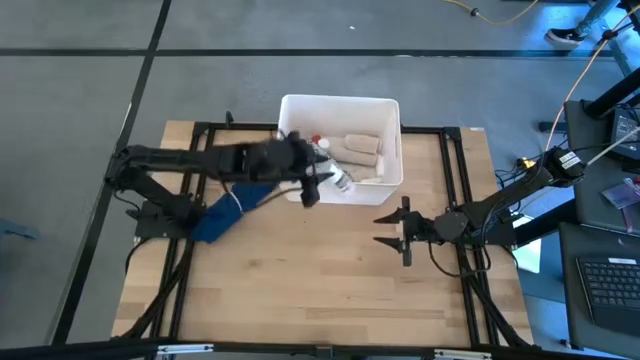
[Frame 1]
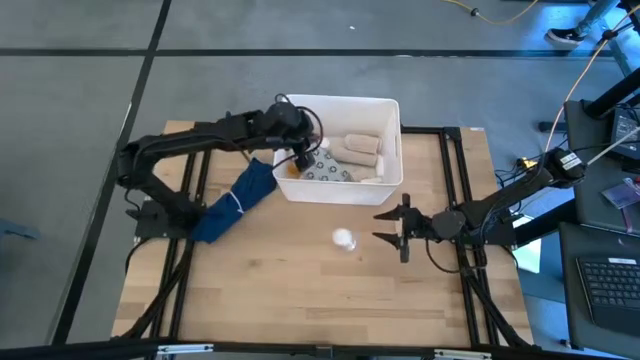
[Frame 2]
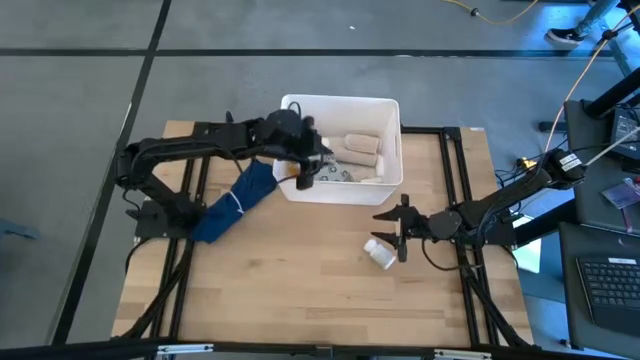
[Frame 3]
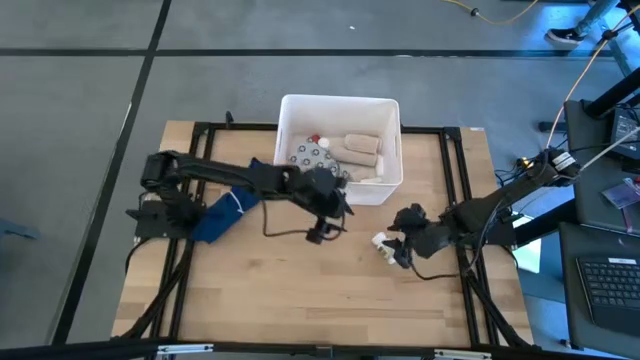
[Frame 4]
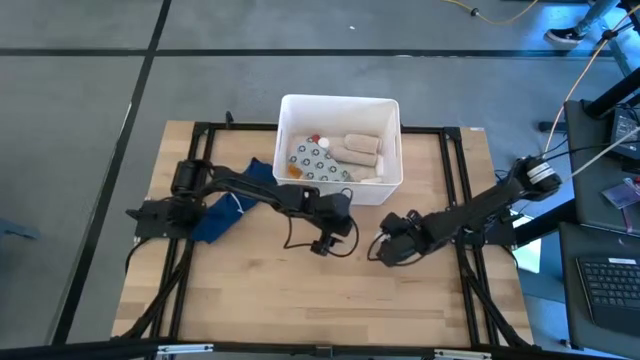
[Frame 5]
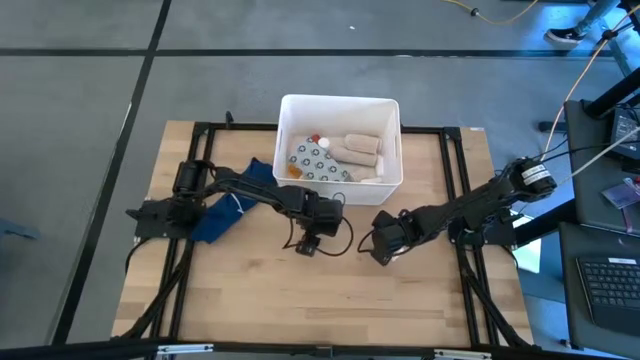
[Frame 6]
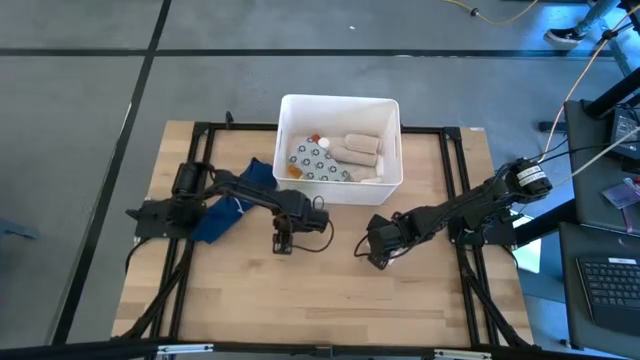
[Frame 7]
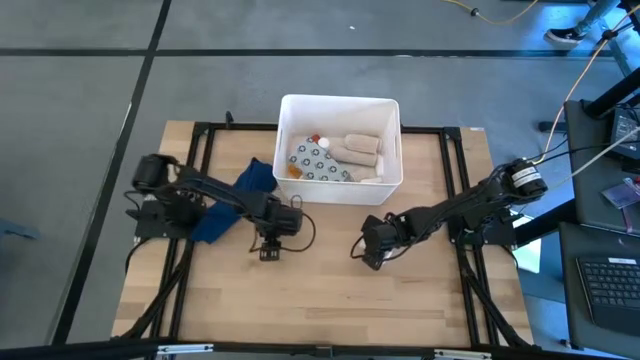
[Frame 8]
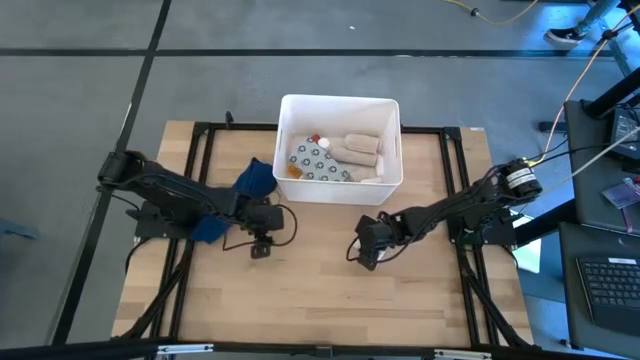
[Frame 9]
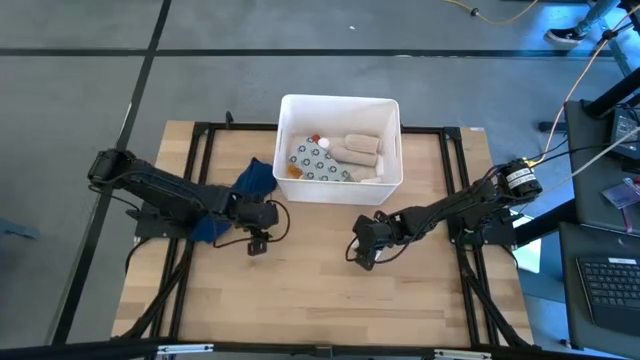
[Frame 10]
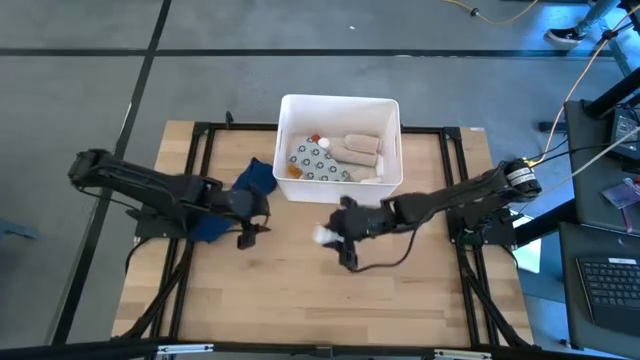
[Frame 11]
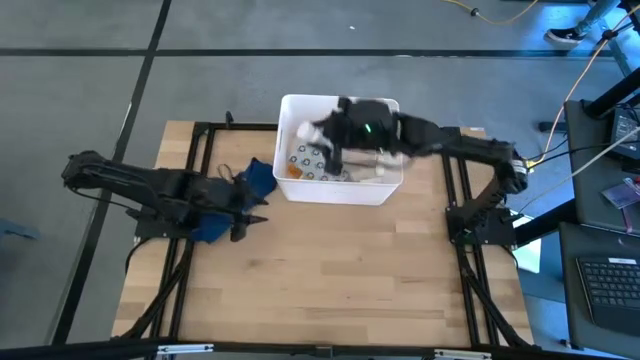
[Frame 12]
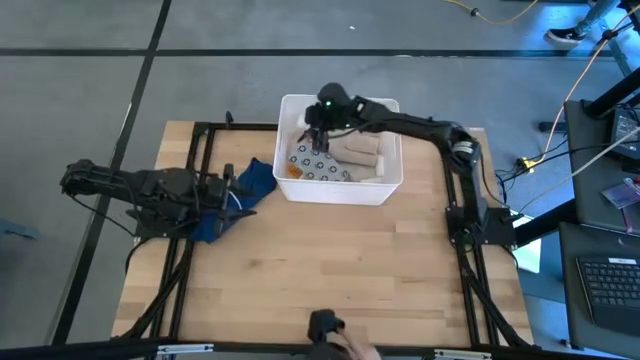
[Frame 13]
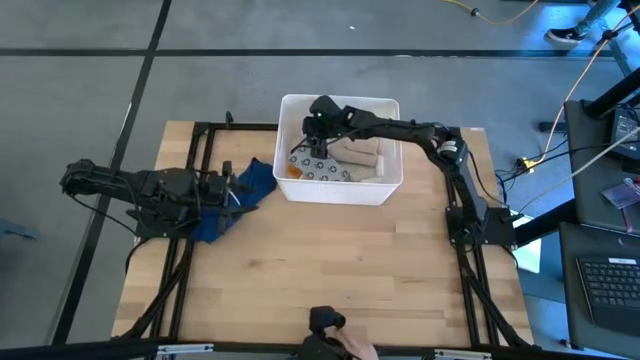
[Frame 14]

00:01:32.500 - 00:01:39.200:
Task: Pick & place medical supplies in basket/bin
Put the white and green pill bottle into the white bin

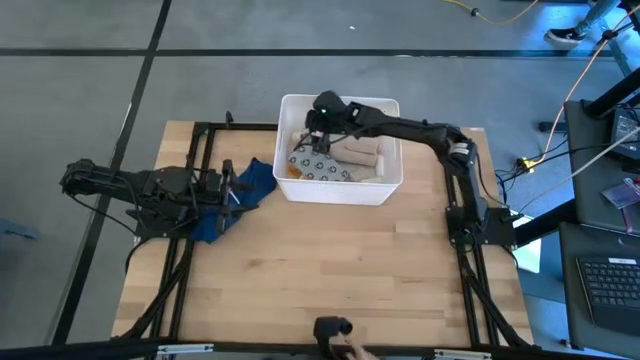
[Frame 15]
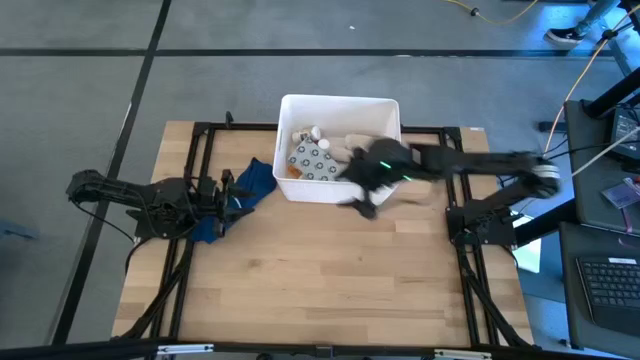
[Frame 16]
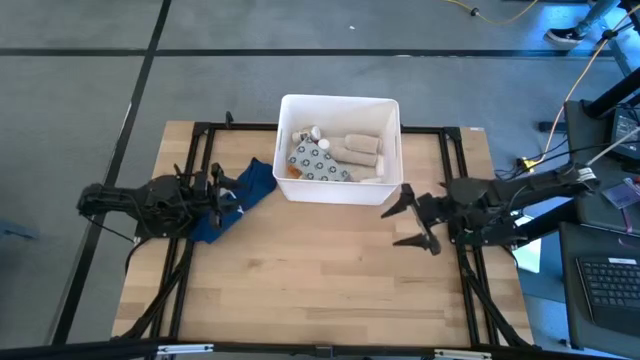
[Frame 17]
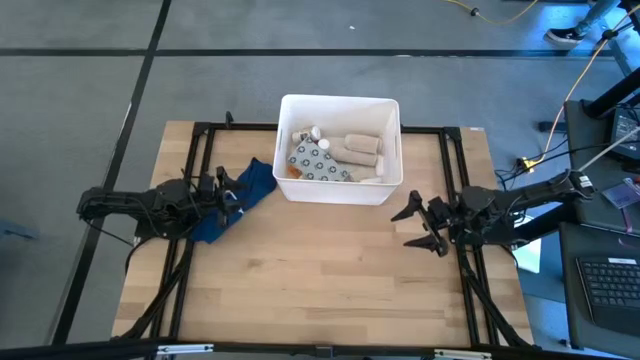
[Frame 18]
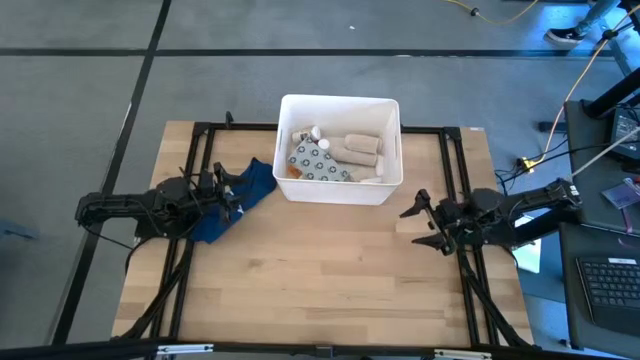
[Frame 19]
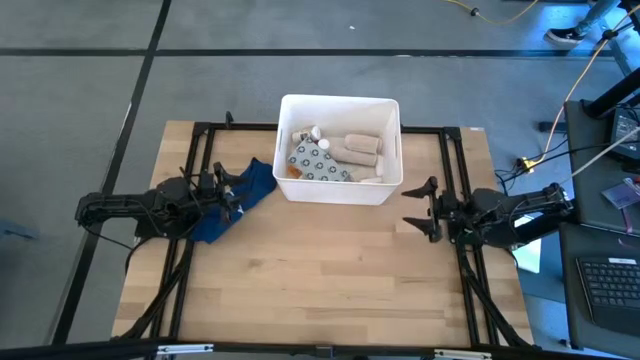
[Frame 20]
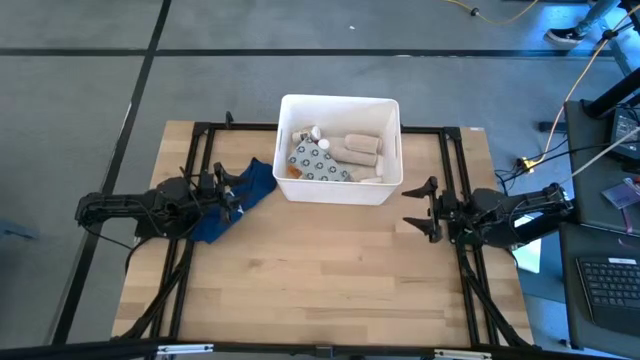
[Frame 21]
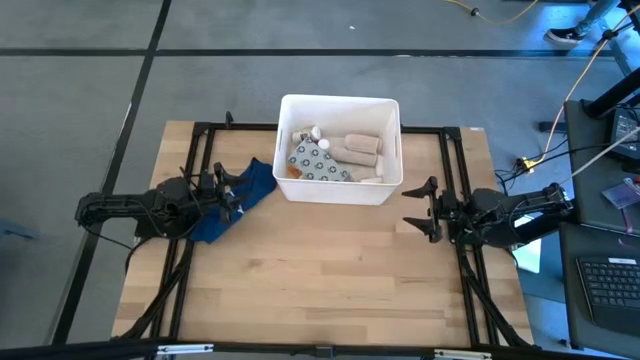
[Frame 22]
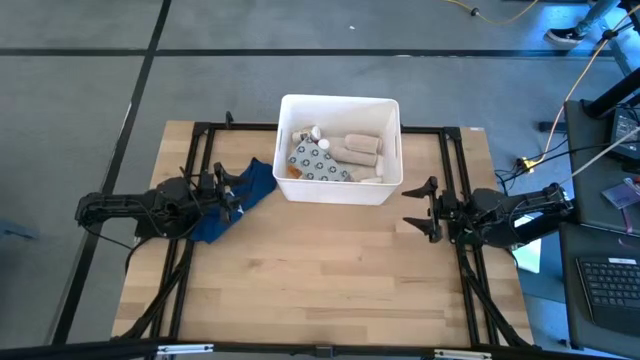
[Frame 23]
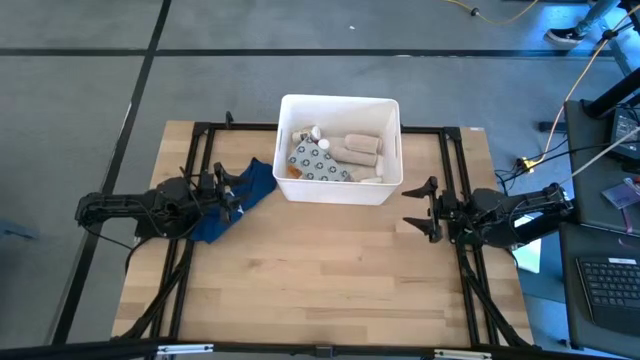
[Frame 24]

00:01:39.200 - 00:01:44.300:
Return to Home Position

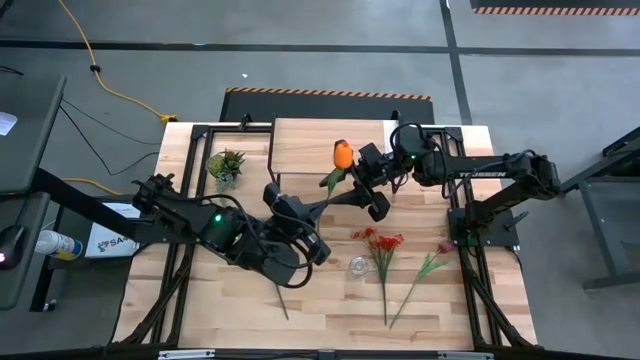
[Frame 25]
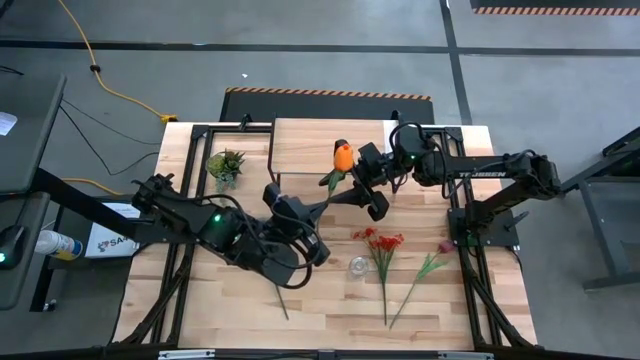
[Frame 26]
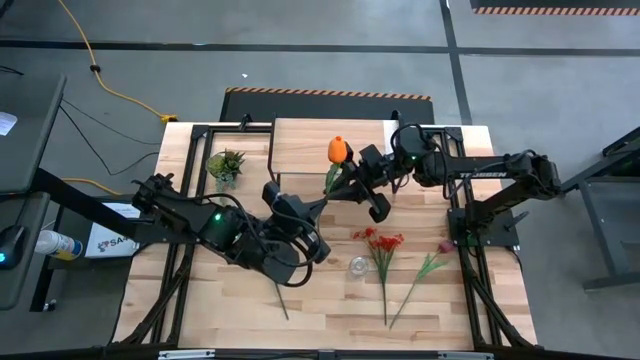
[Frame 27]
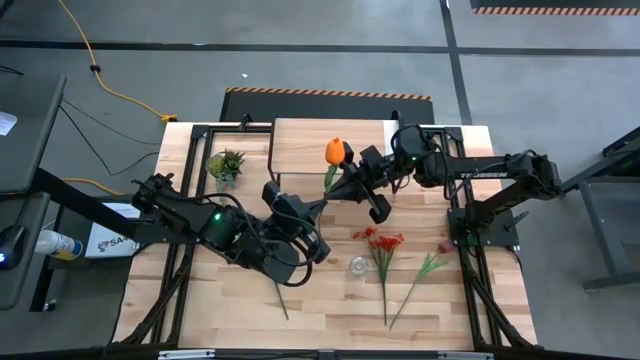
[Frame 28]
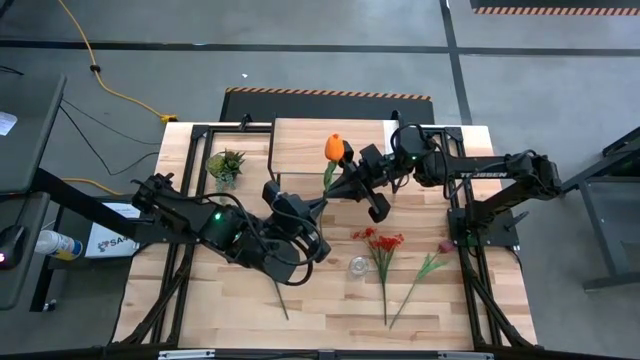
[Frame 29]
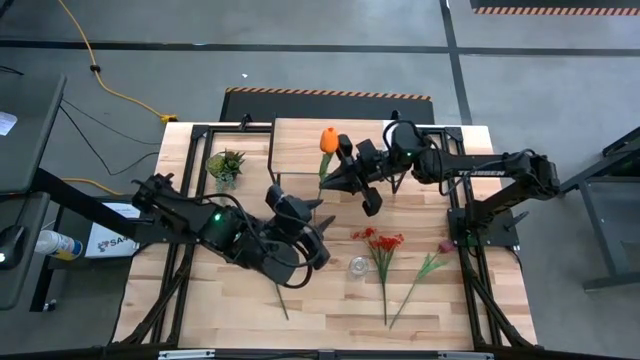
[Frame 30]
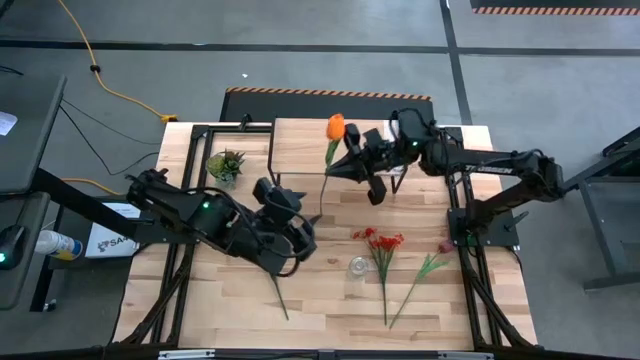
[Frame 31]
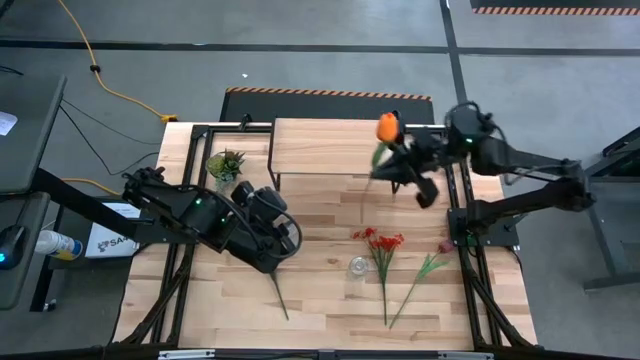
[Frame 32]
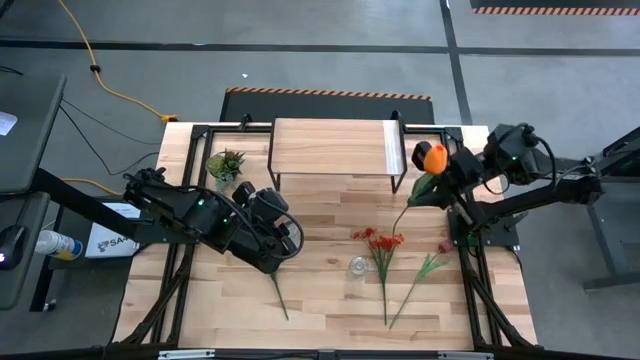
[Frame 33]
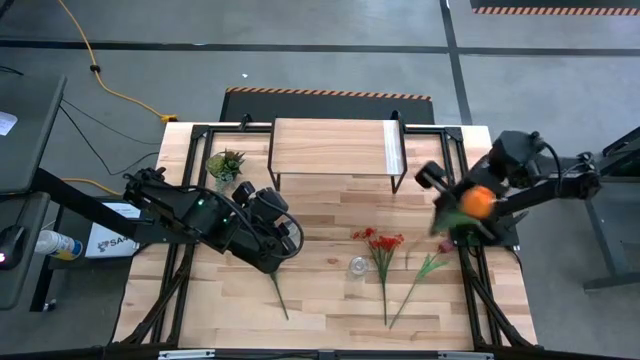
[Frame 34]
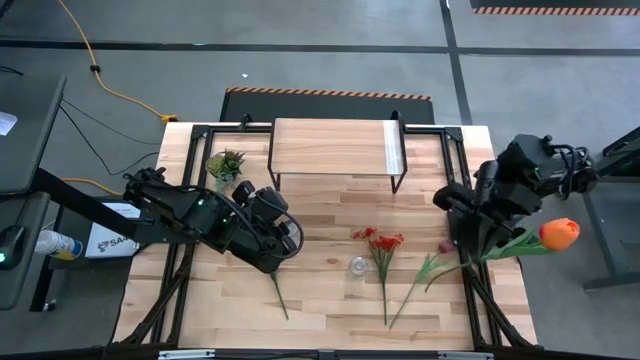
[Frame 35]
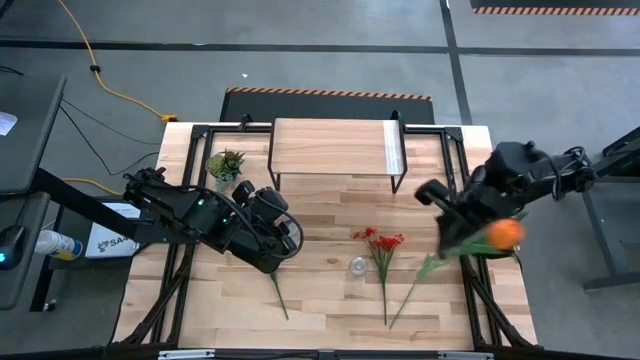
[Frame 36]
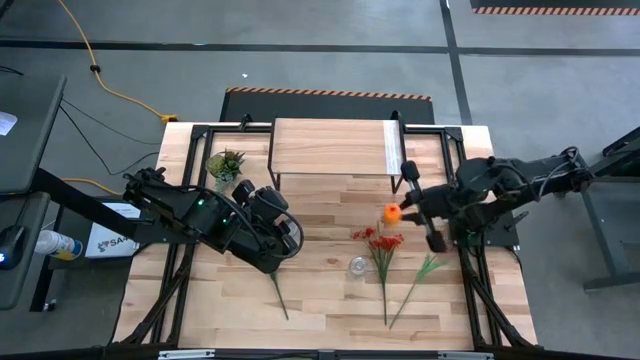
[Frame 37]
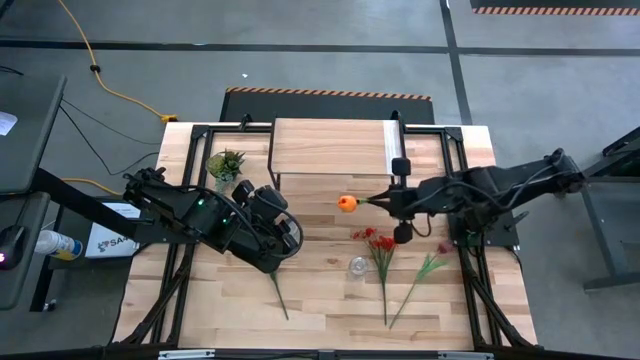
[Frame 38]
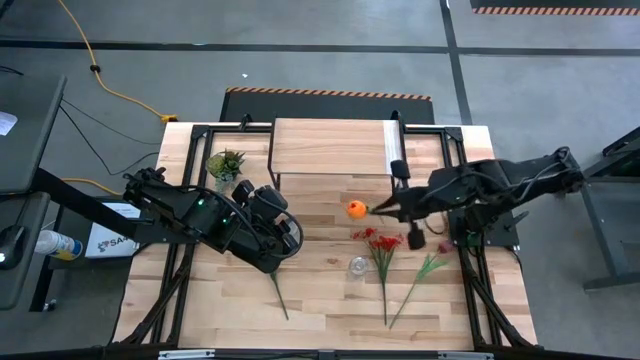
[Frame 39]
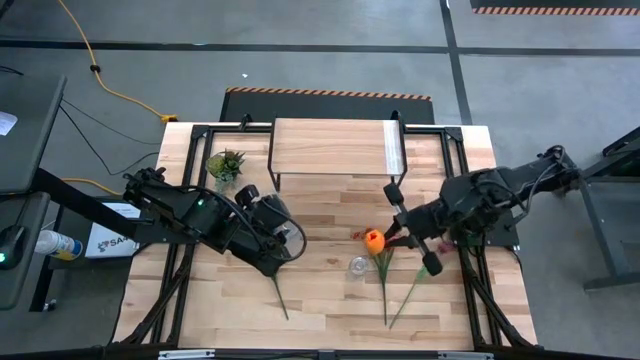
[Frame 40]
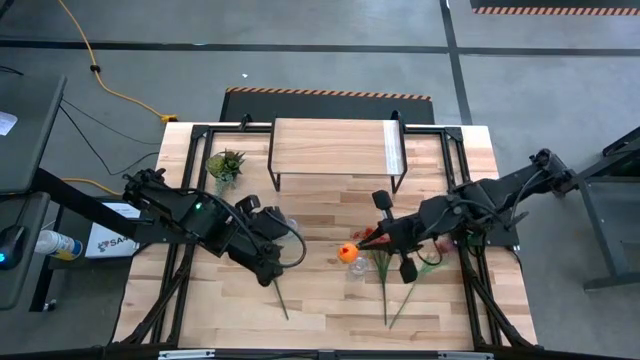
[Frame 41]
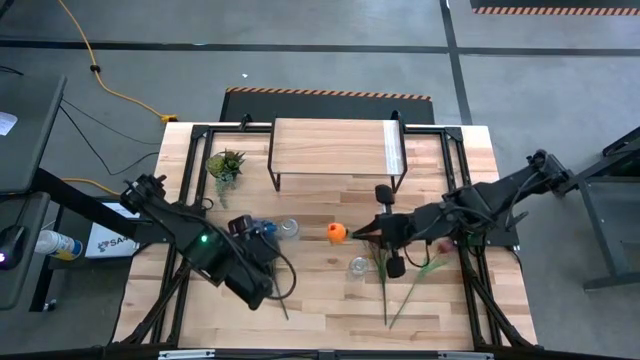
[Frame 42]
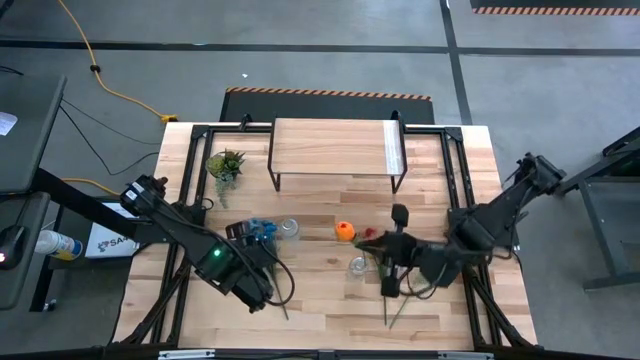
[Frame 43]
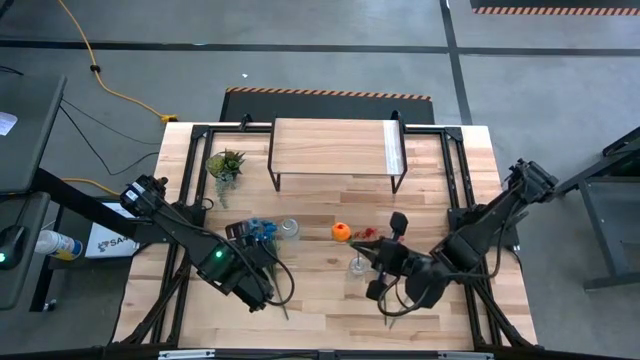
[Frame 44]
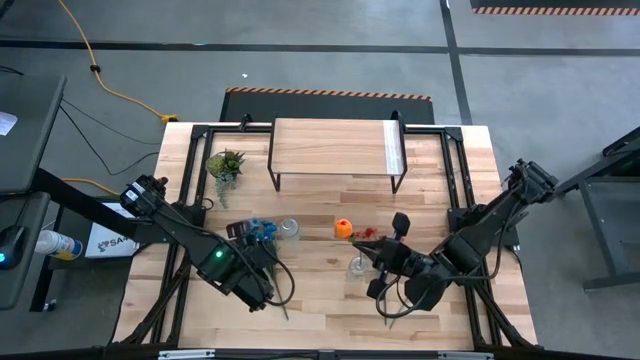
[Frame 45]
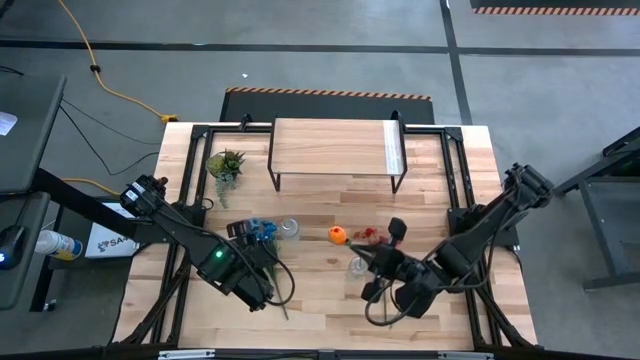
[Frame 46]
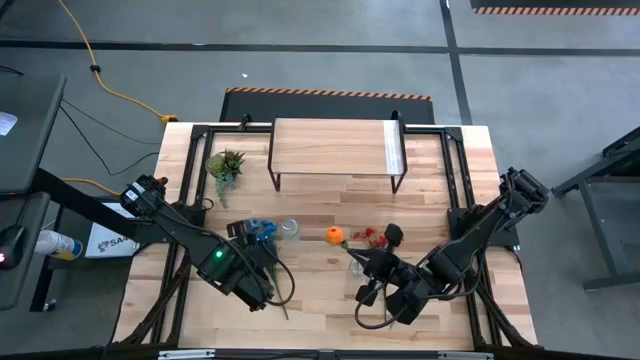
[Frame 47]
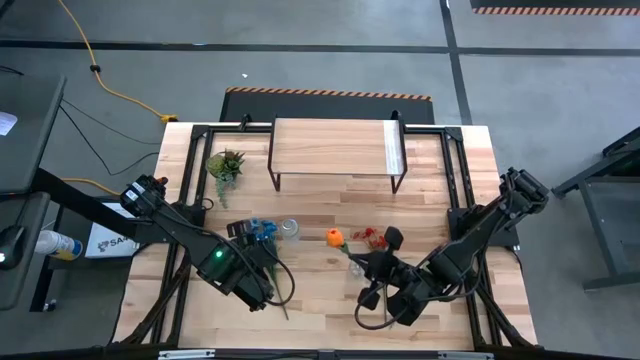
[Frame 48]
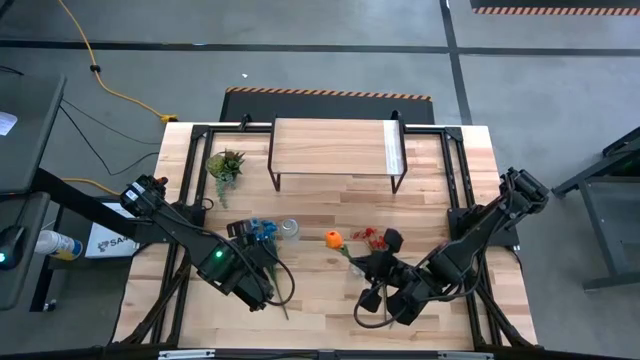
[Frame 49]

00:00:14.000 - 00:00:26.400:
Task: Pick and place flowers into a vace then onto a shelf
Put the orange flower into the right transparent vase
